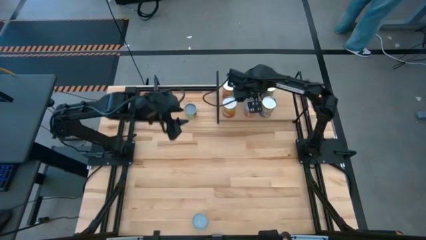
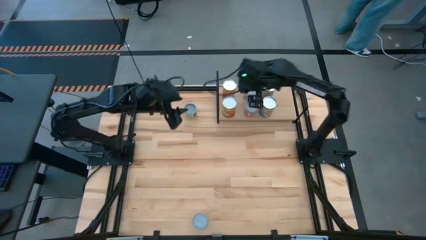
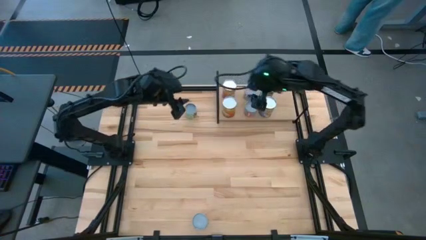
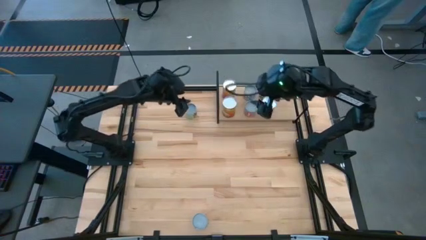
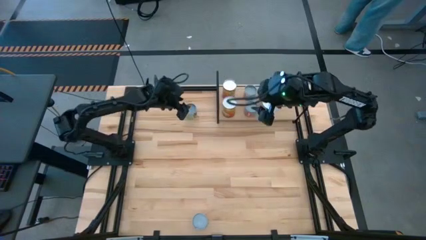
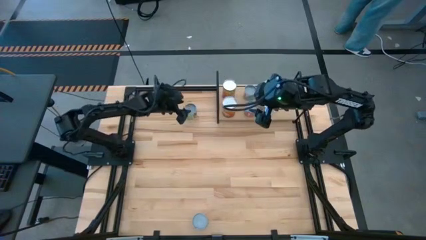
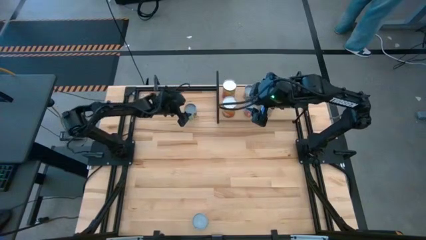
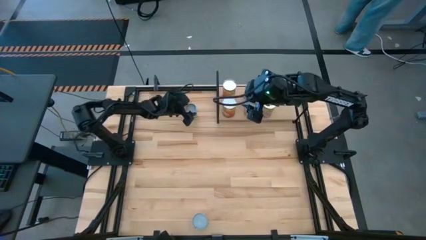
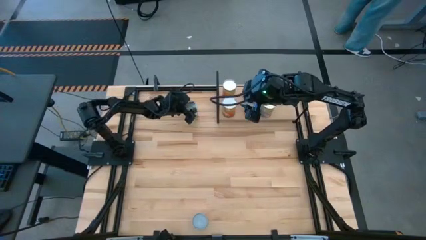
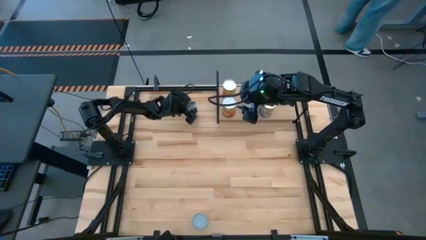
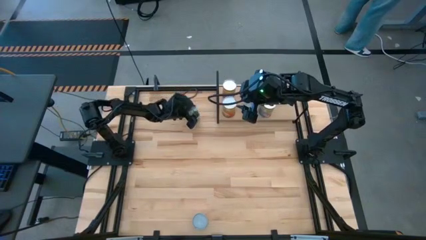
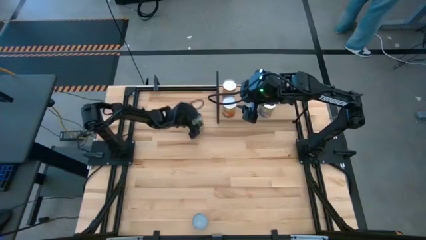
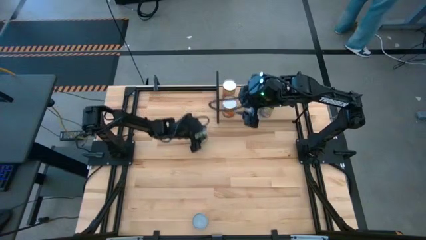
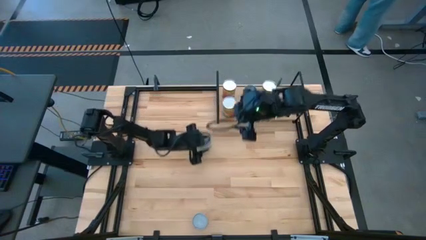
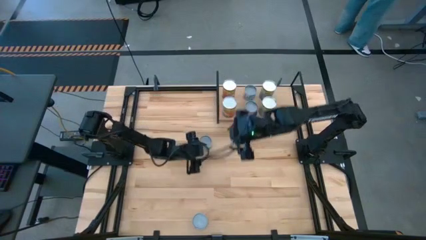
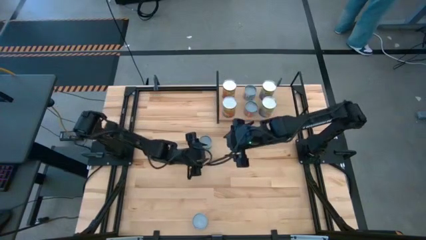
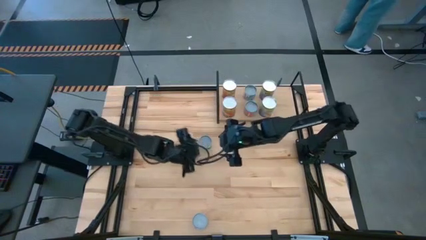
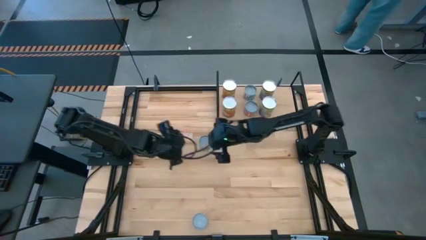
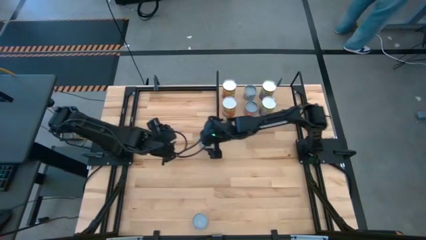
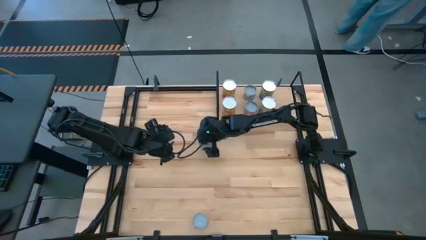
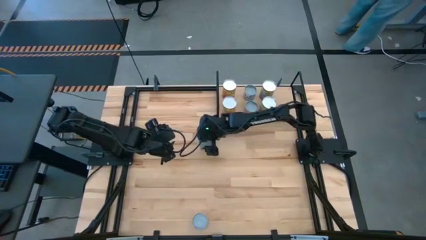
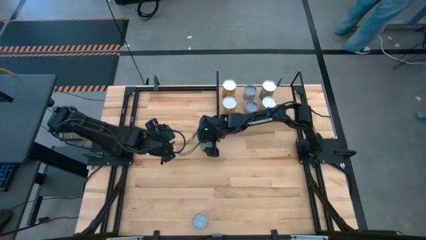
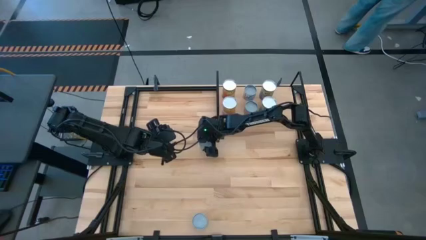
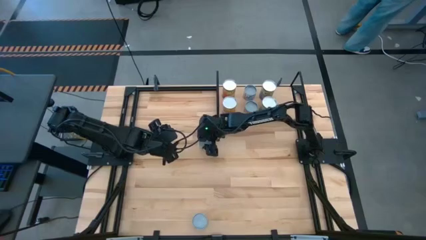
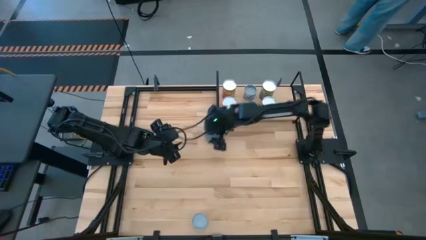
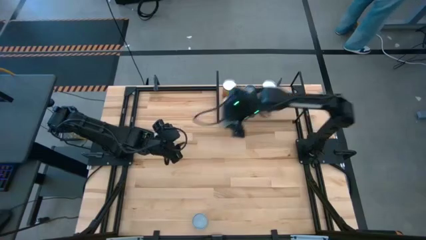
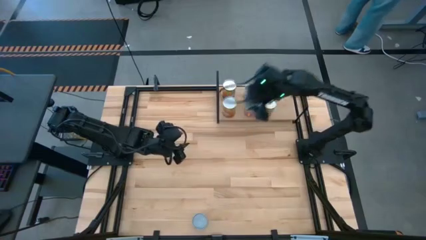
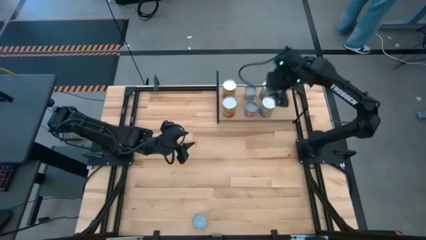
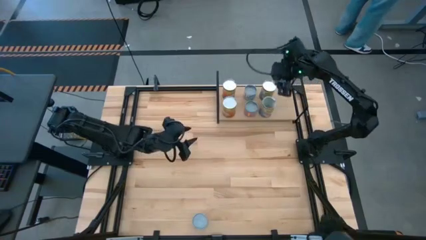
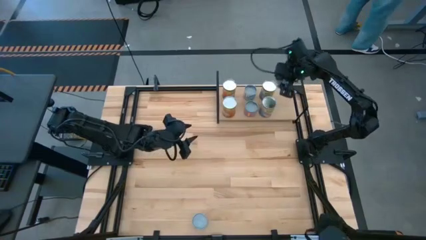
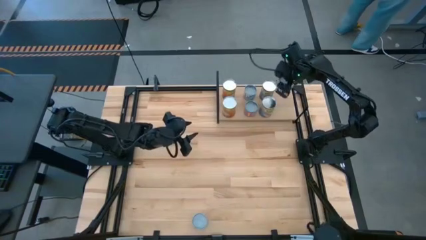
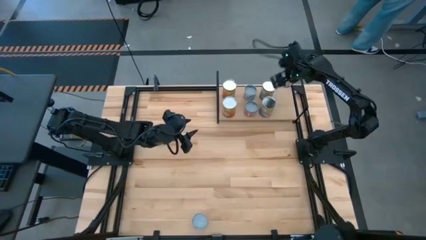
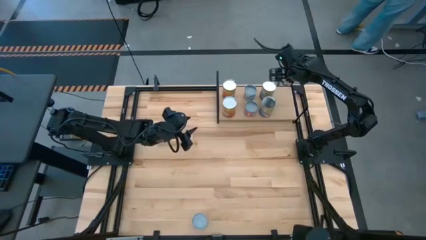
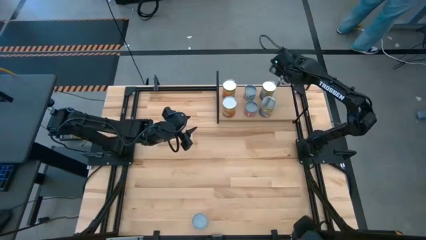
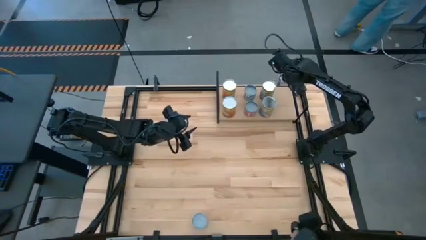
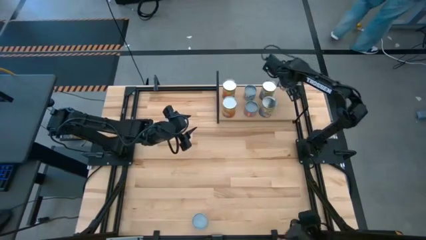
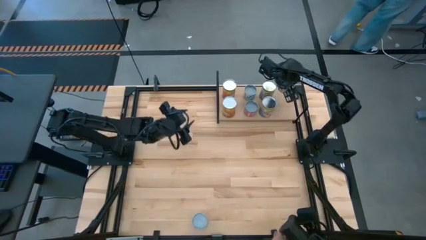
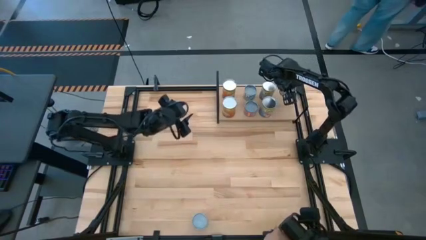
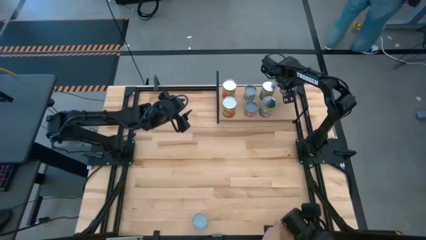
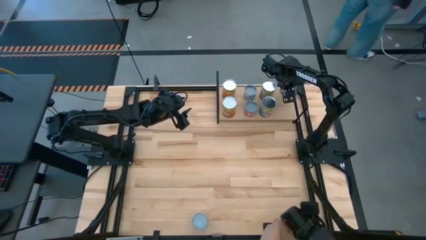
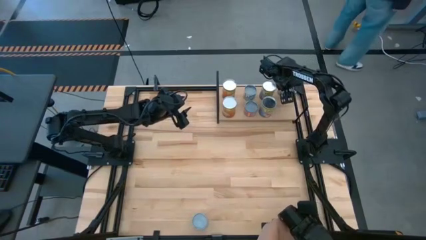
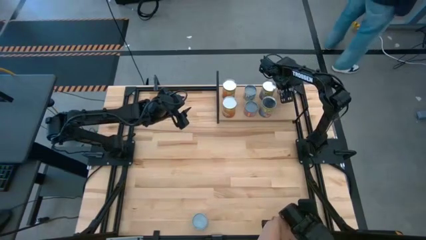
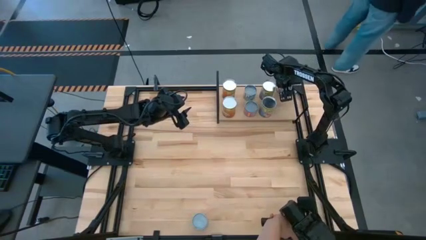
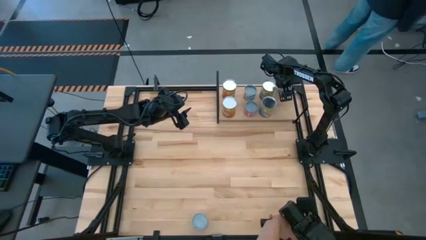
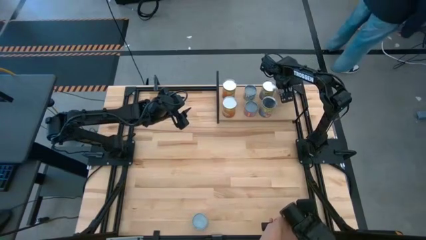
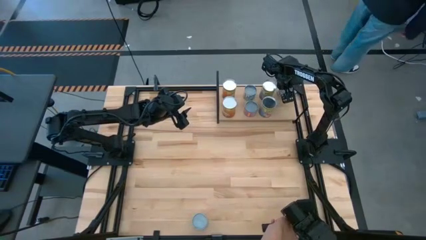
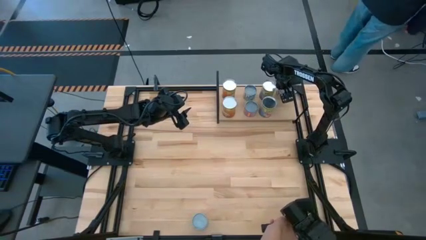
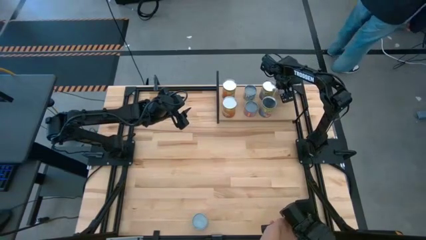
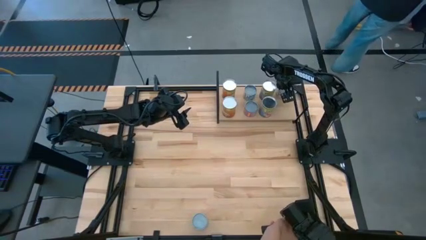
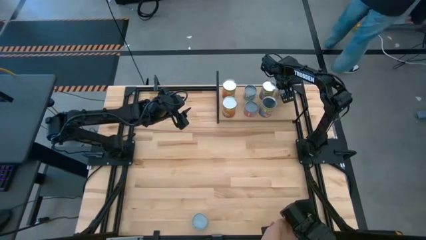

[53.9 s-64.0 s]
Task: Pick and place cans onto a shelf
Put the small green can on the shelf

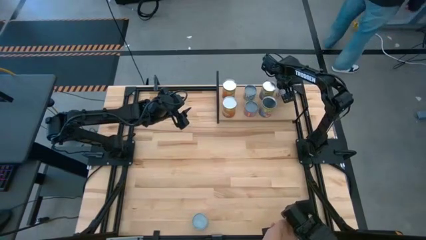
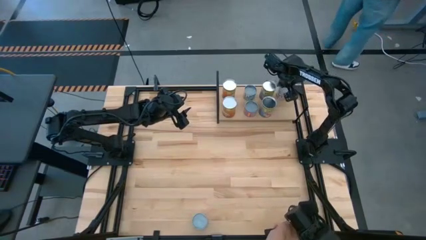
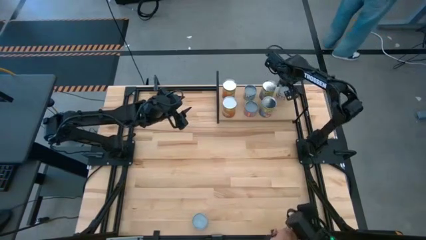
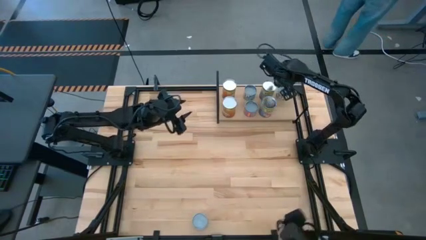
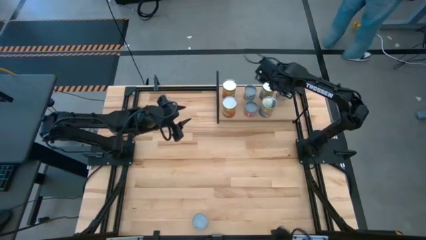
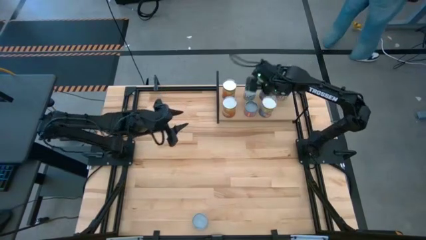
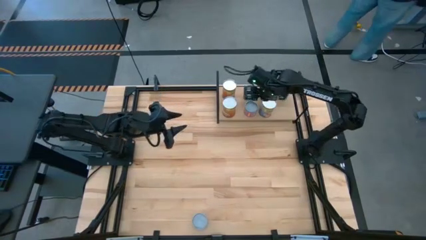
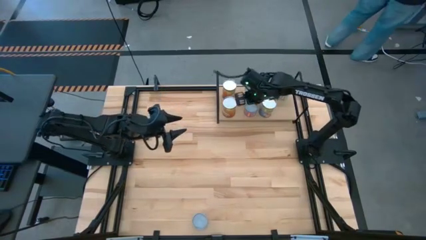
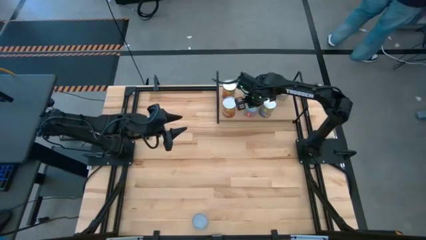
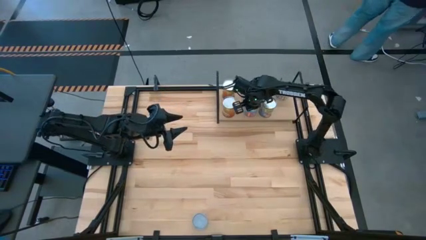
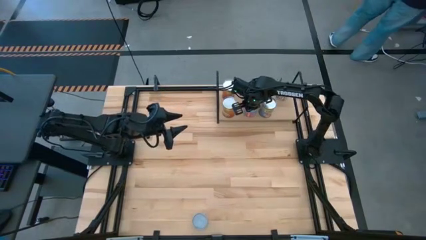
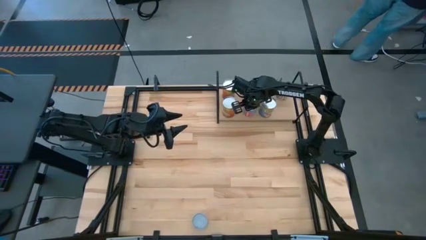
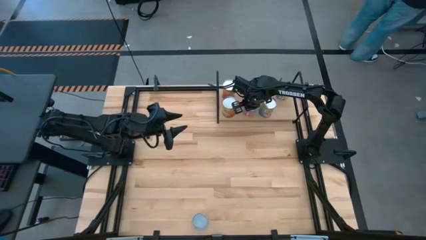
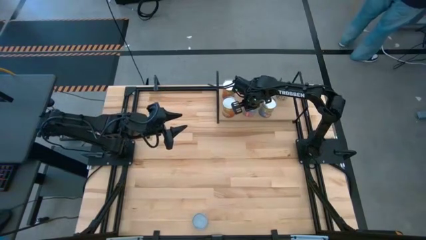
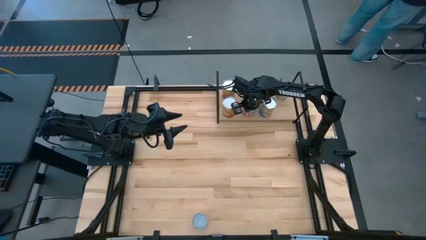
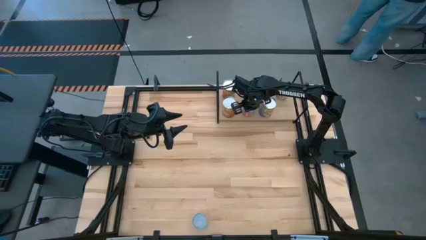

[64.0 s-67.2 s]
Adjust the small blue can on the shelf
